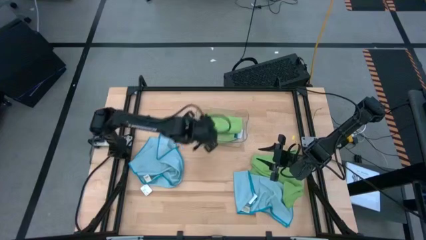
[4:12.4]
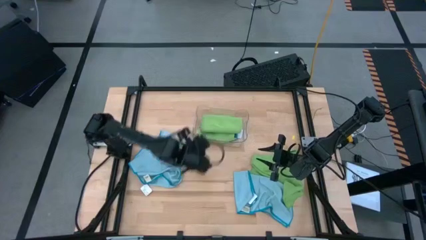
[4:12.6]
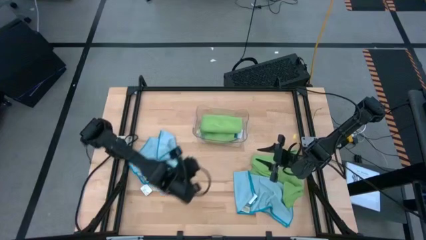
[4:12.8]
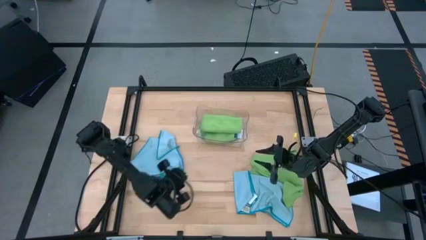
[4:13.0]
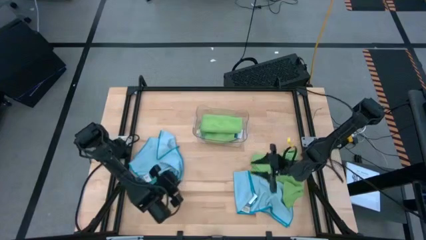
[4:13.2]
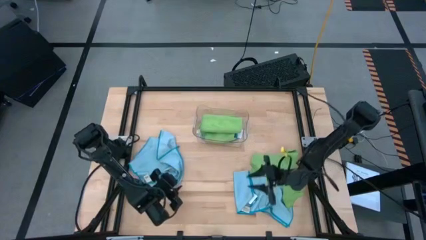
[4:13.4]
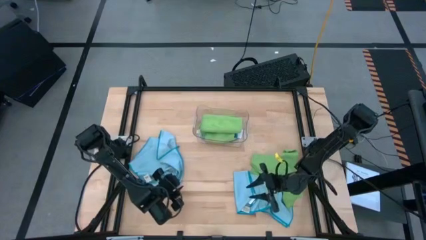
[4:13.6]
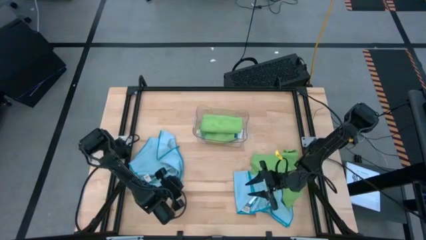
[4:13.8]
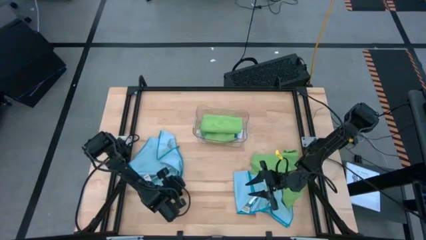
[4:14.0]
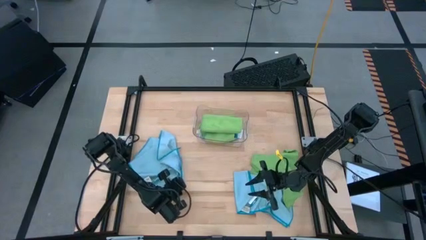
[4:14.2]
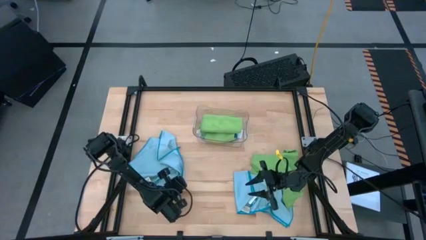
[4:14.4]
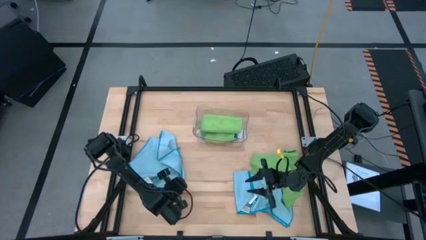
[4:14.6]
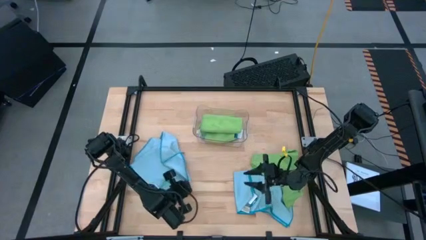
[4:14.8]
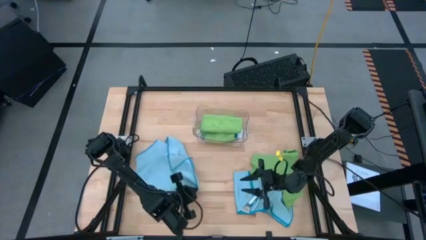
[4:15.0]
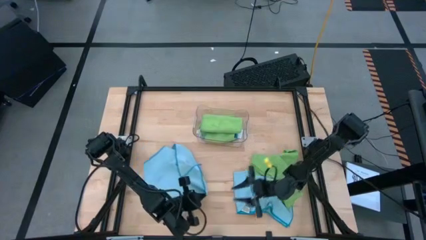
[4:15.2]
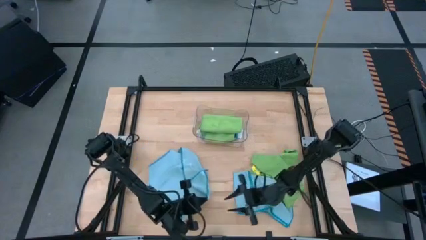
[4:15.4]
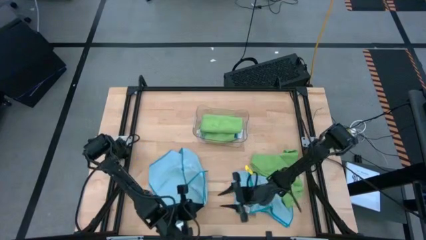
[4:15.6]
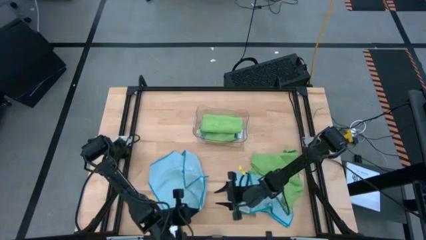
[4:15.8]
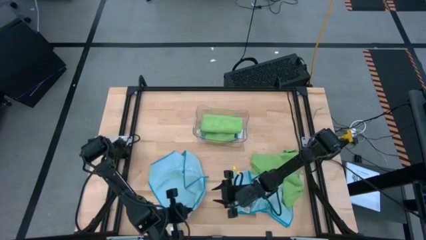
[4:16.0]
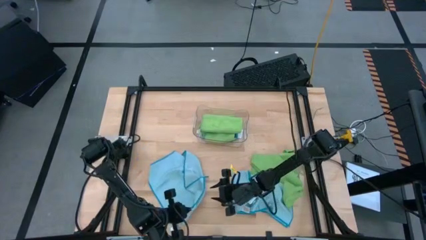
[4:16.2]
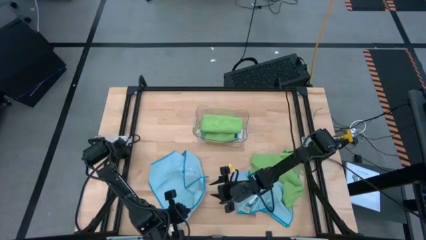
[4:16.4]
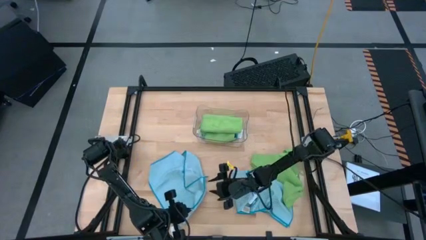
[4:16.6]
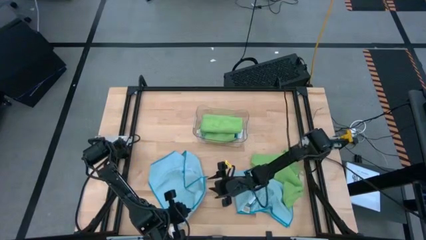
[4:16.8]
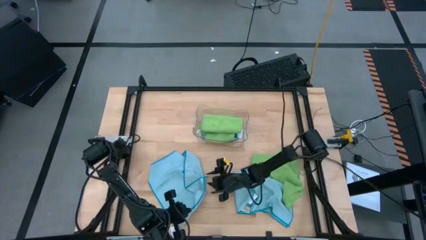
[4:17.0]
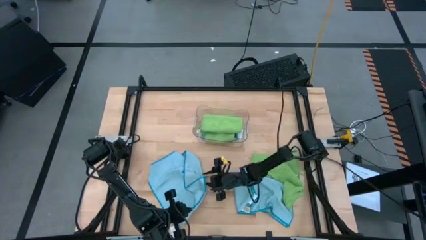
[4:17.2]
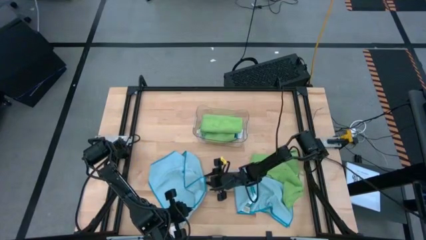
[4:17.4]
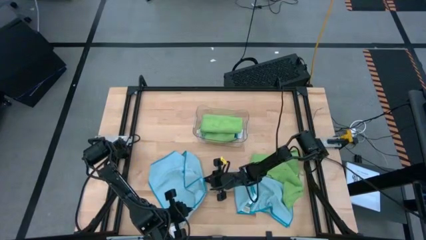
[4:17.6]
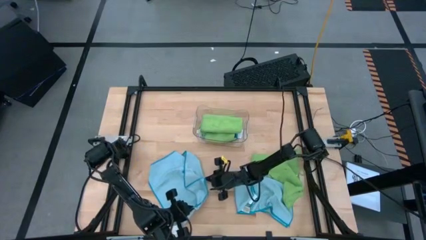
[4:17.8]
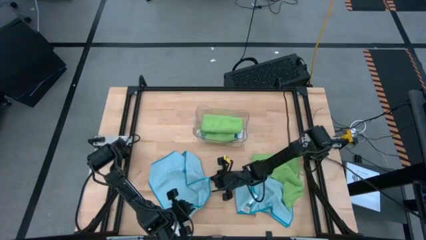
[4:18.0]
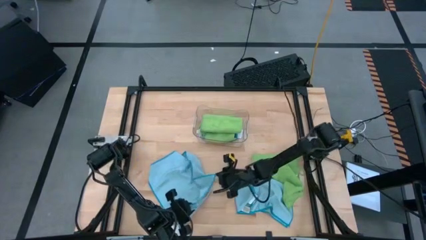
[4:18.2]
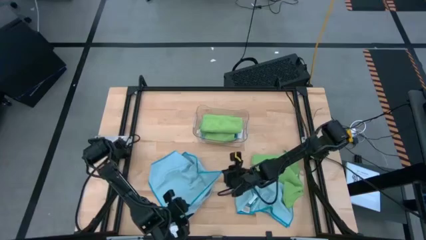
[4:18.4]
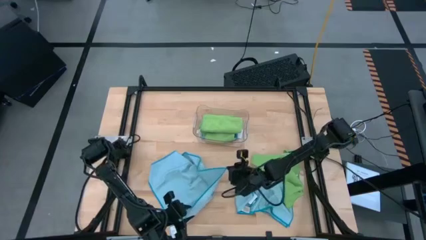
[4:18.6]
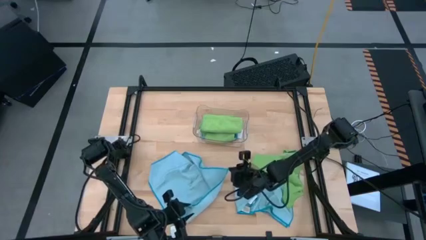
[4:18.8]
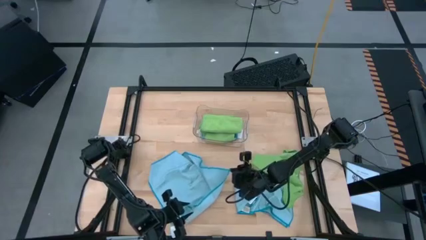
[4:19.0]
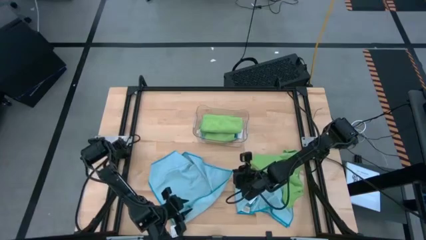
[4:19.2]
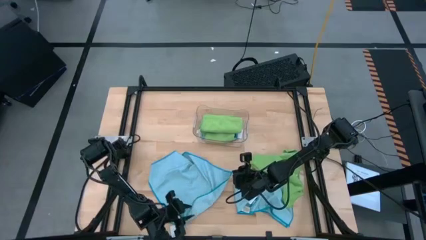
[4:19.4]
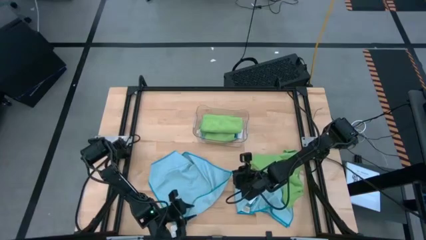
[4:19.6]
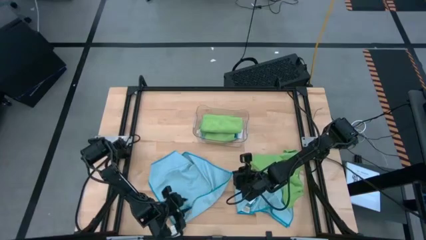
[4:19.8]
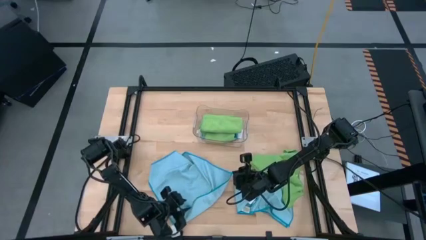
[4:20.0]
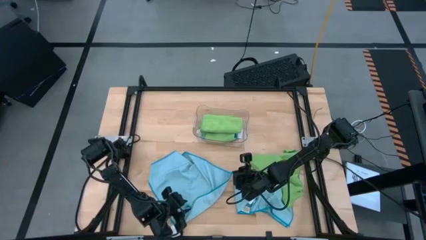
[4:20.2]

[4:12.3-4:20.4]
Task: Fold microfiber towels
Fold the left blue microfiber cloth

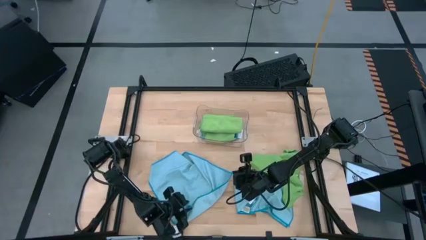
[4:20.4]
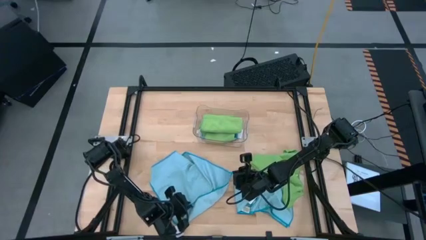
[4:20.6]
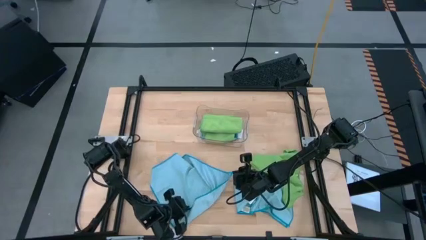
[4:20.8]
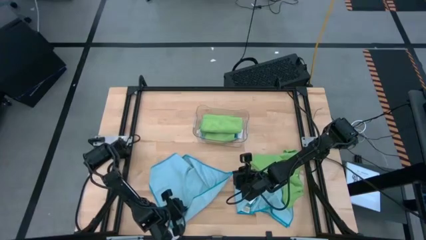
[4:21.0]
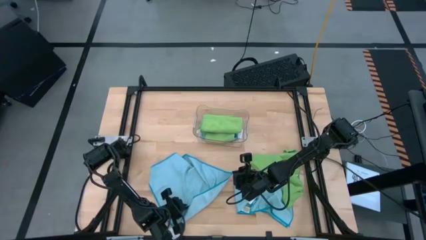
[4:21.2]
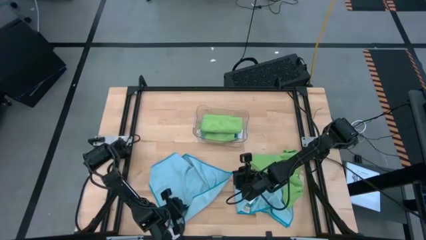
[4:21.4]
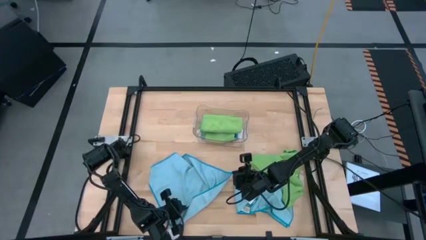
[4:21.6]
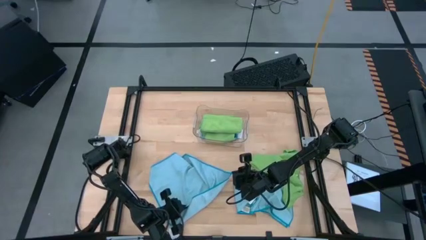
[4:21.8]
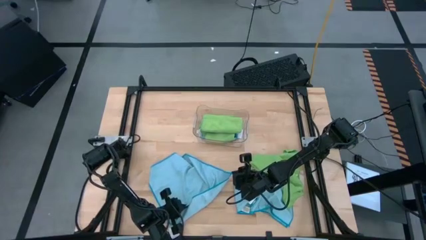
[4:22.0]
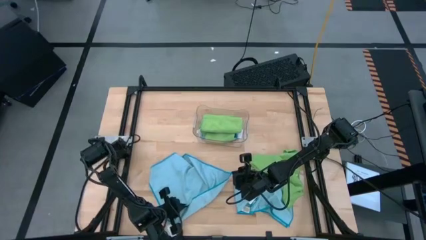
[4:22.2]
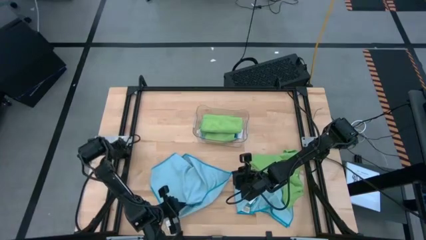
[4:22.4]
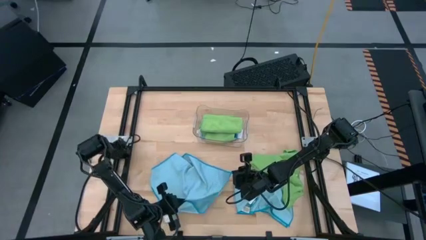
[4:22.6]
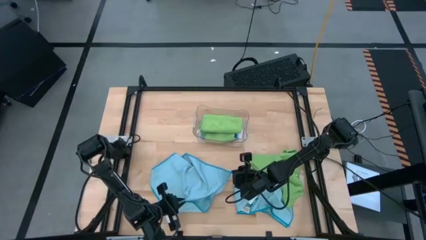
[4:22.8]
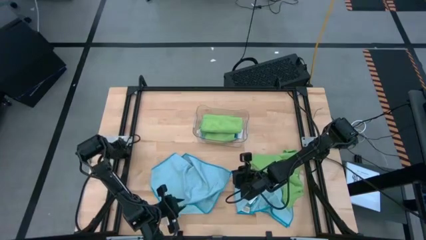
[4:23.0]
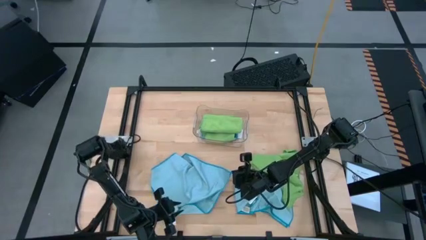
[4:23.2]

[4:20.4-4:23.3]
Fold the left blue microfiber cloth
